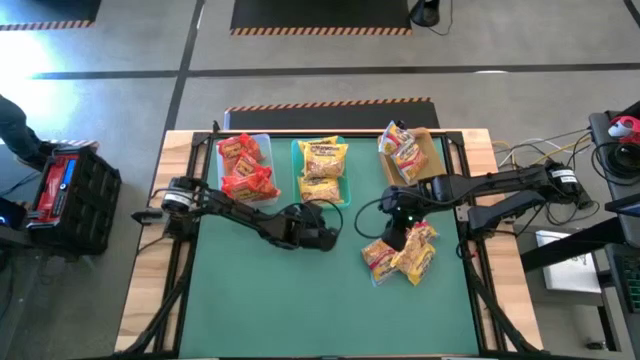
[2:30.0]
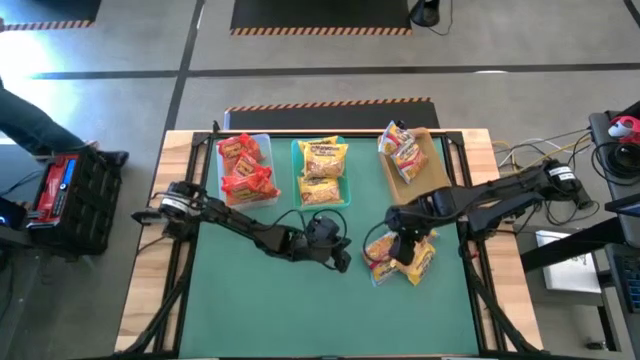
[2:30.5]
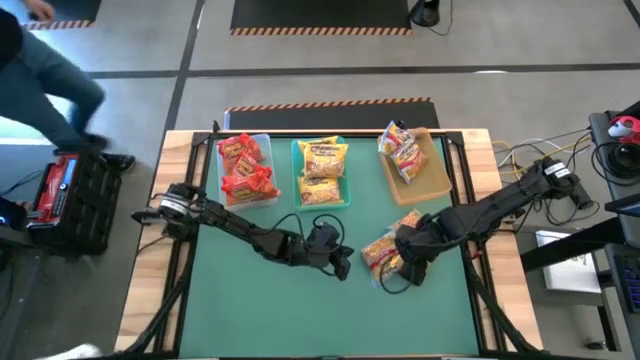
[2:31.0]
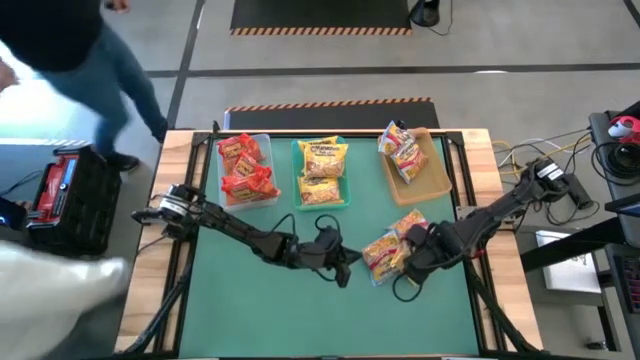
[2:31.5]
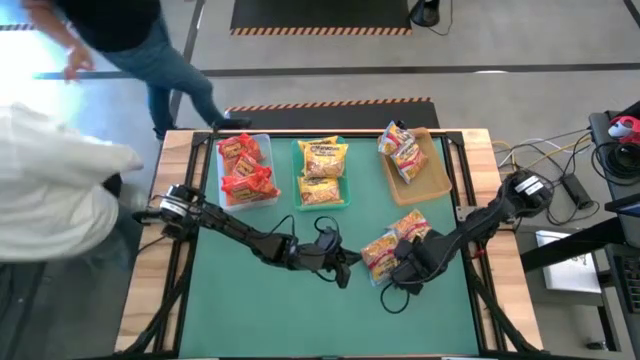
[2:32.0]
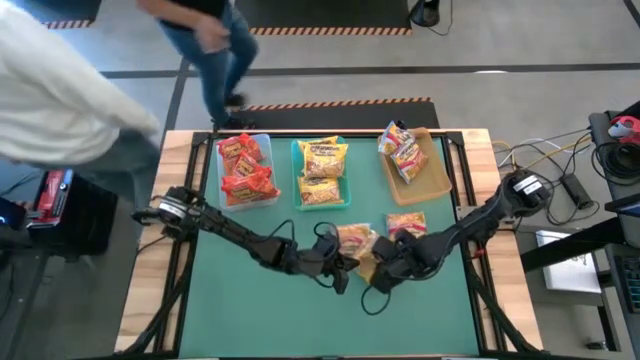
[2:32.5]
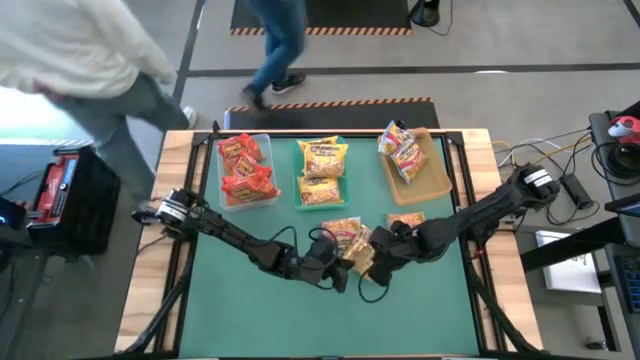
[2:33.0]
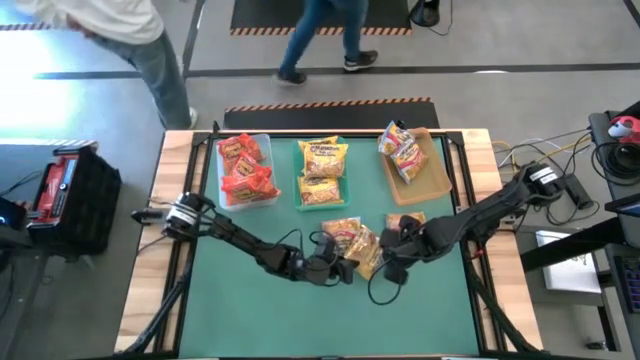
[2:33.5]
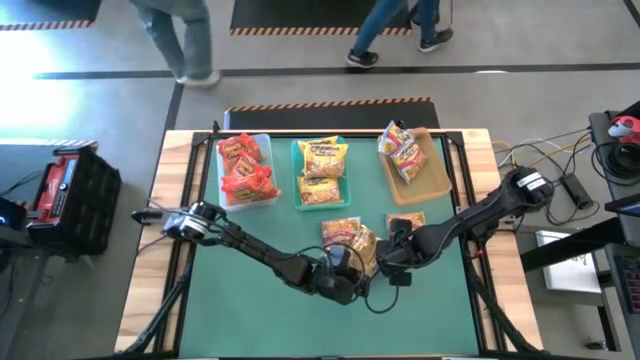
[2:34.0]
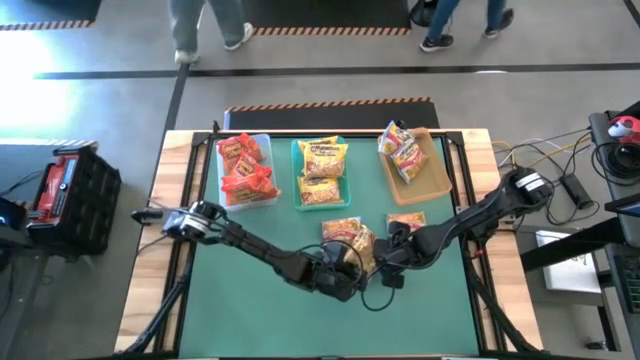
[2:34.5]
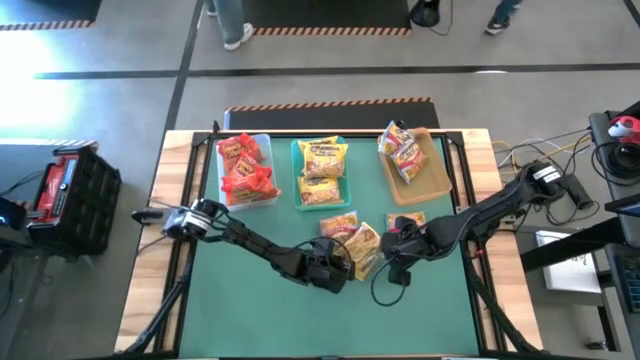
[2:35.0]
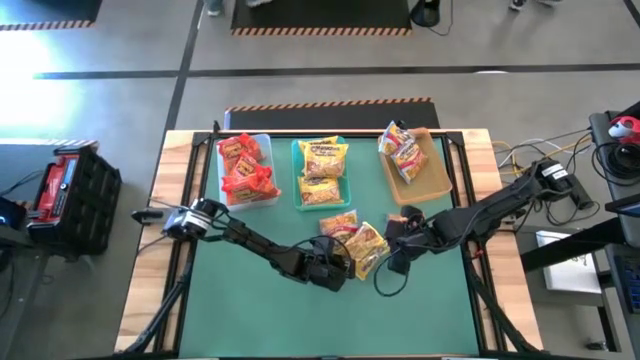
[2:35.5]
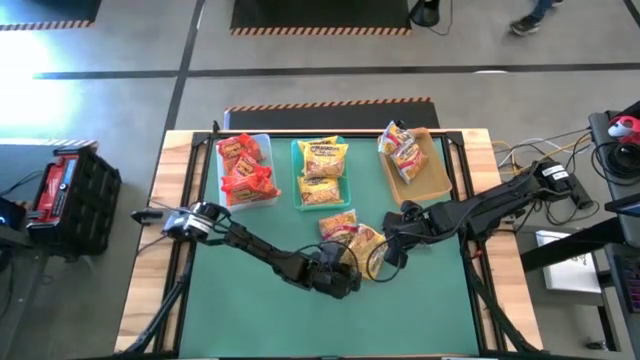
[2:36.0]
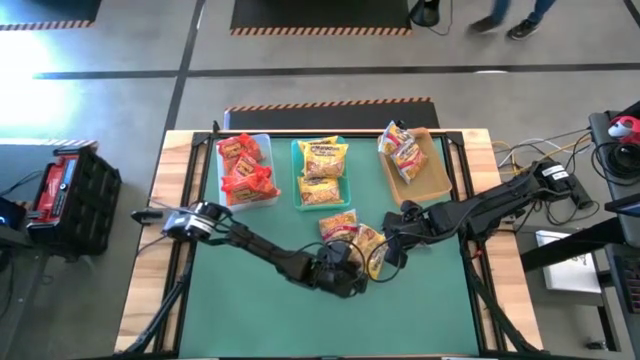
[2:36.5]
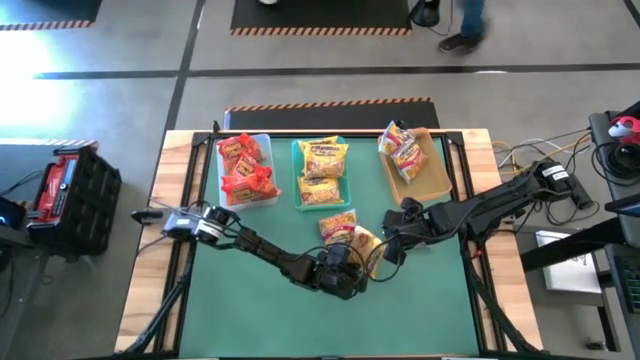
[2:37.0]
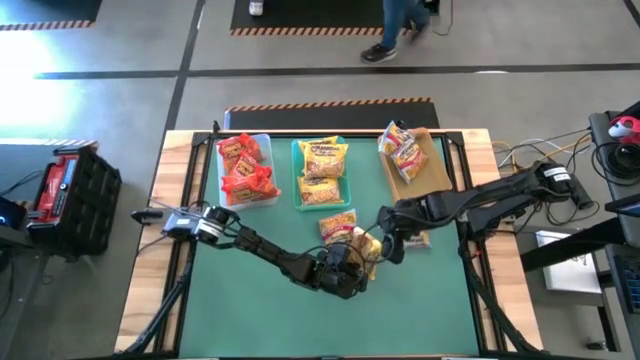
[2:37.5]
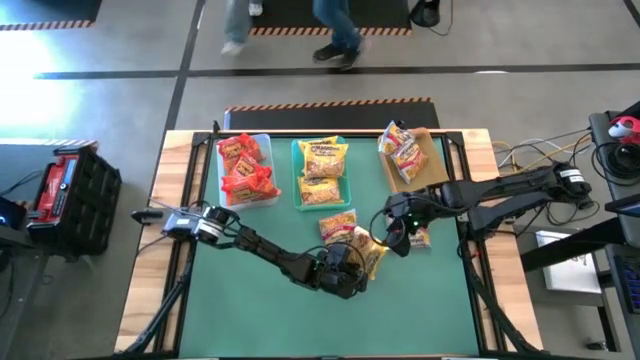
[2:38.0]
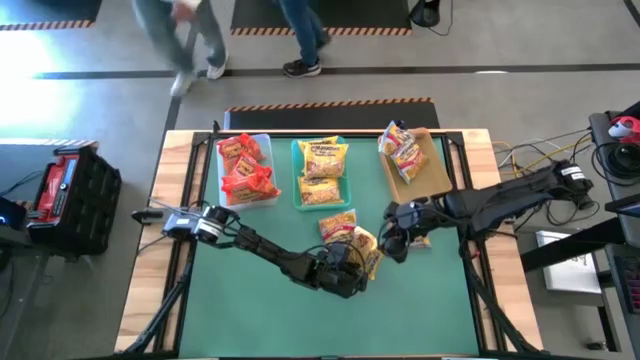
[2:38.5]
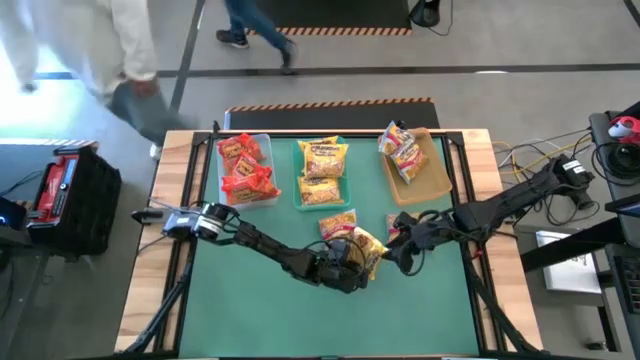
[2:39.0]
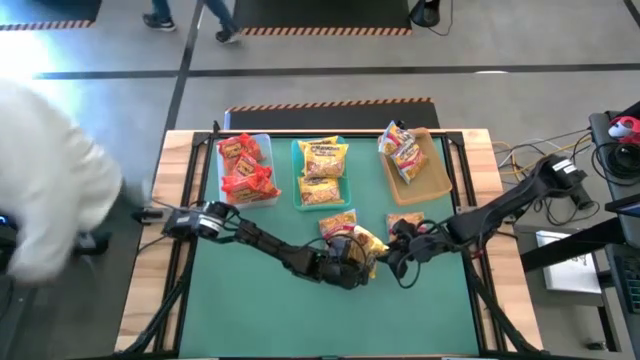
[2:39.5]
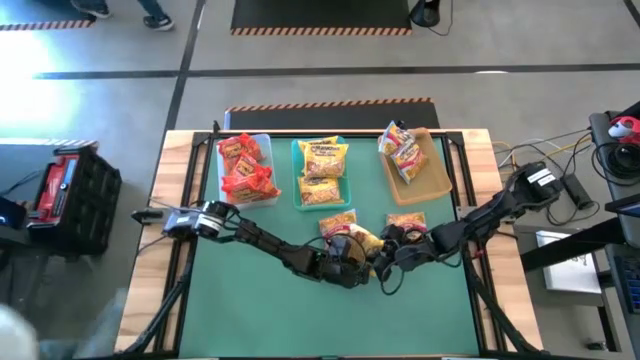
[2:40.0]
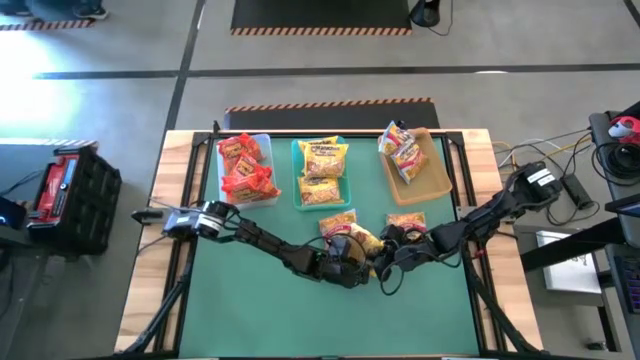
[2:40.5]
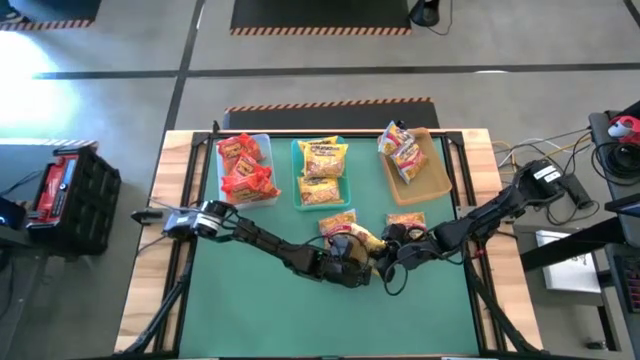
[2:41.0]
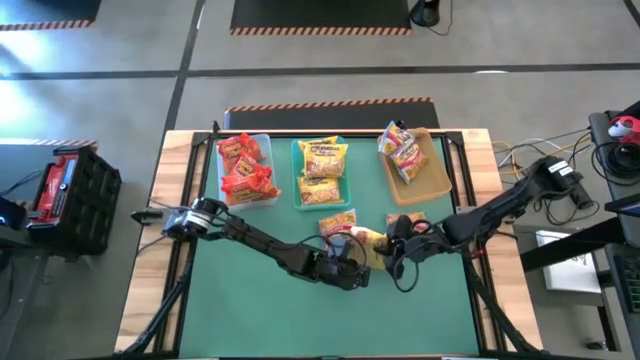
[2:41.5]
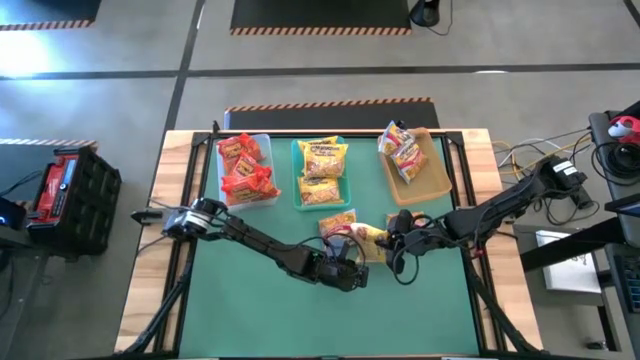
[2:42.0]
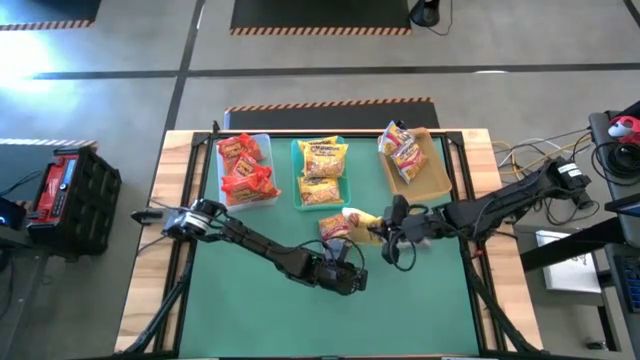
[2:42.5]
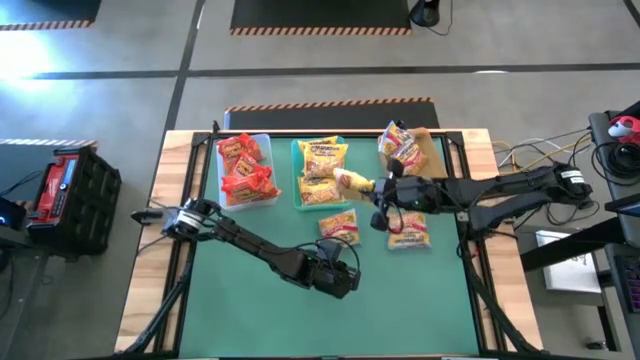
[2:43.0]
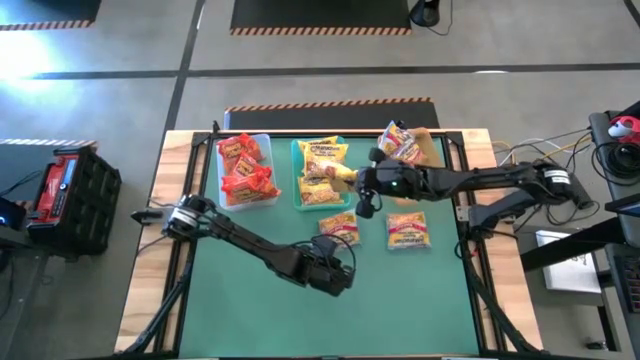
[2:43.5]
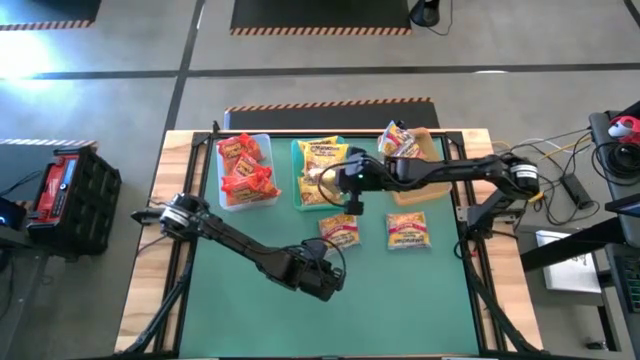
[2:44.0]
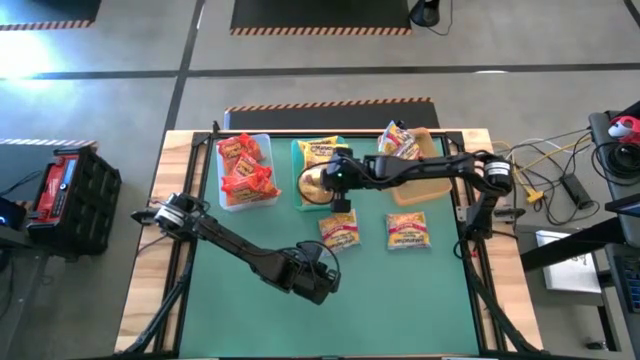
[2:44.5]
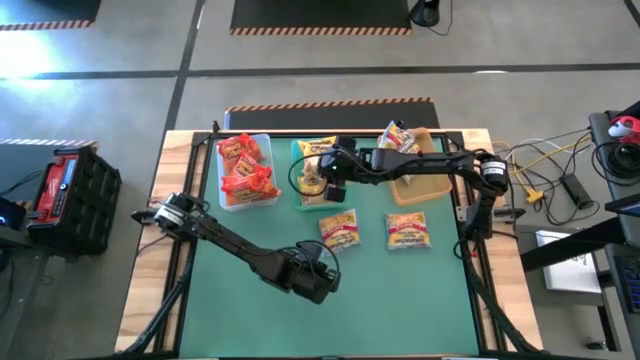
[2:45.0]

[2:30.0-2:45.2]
Task: Sort Maruchan noodles
Put the yellow noodle pack into the blue bin

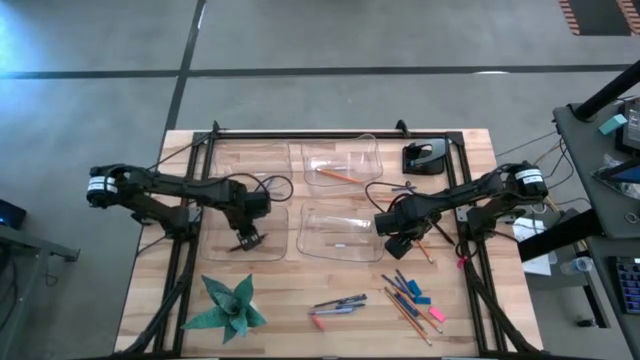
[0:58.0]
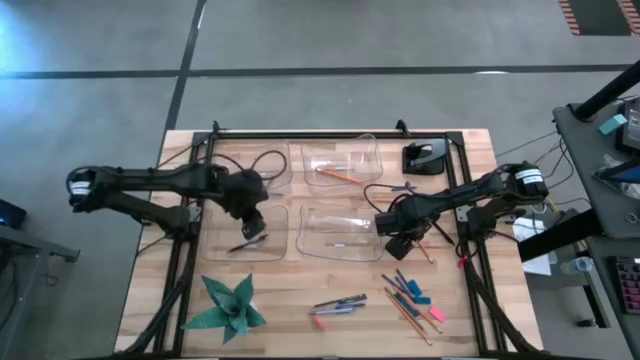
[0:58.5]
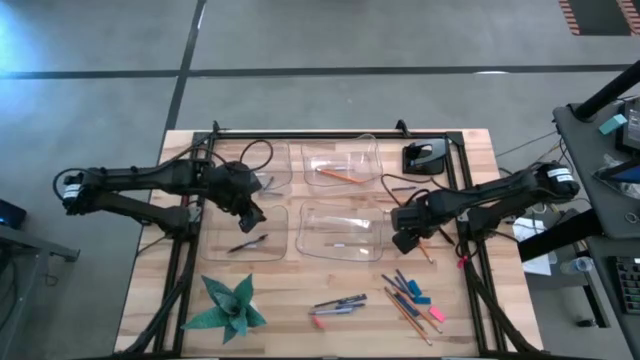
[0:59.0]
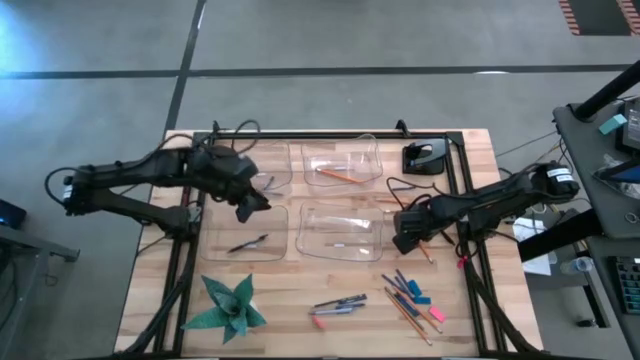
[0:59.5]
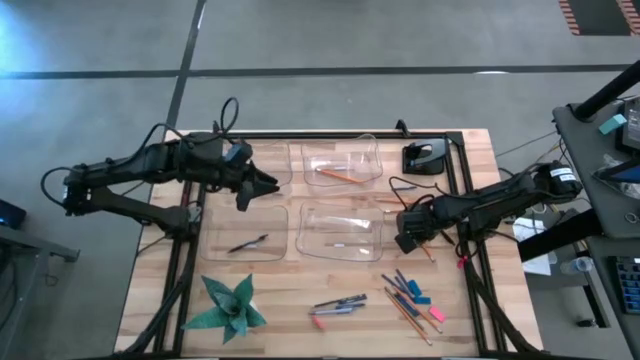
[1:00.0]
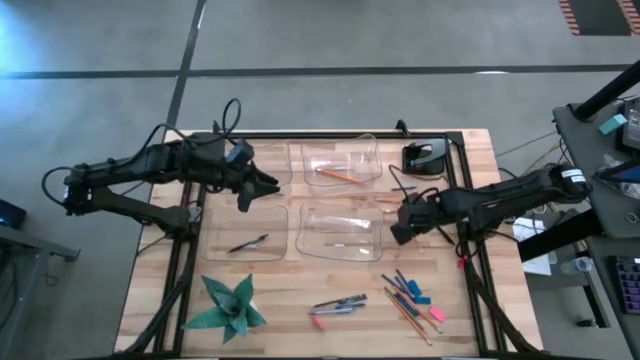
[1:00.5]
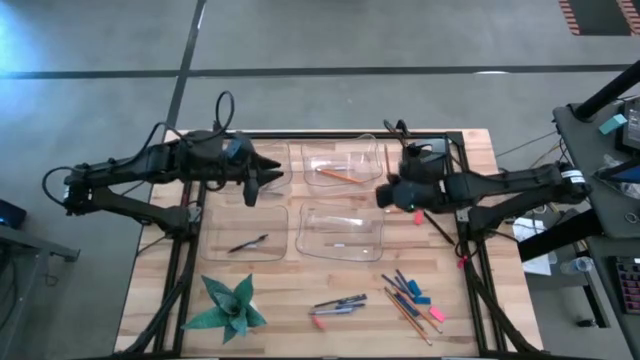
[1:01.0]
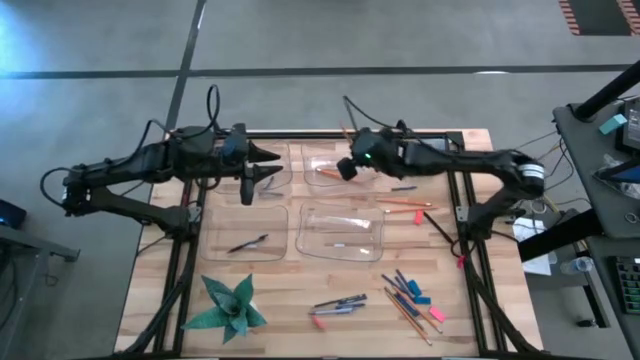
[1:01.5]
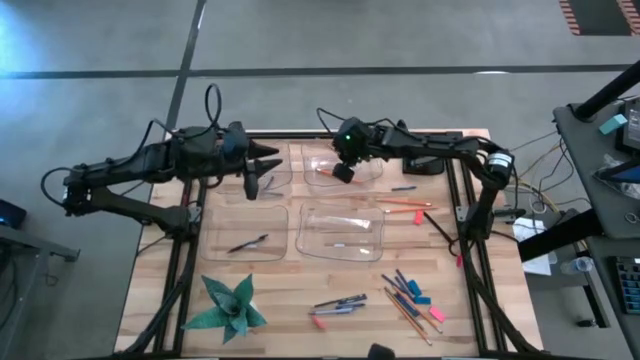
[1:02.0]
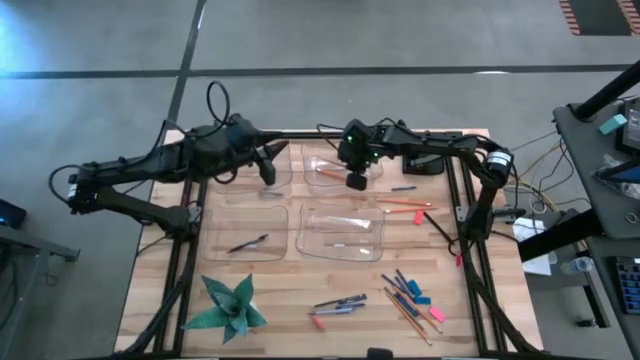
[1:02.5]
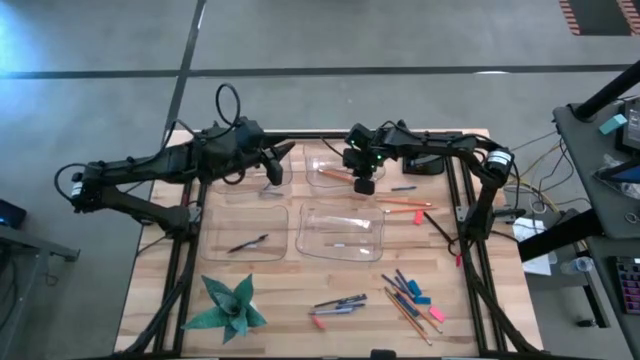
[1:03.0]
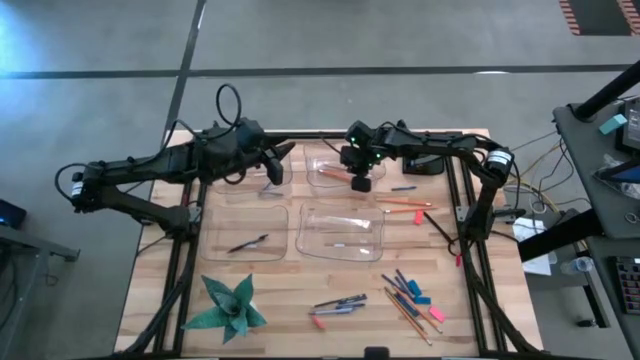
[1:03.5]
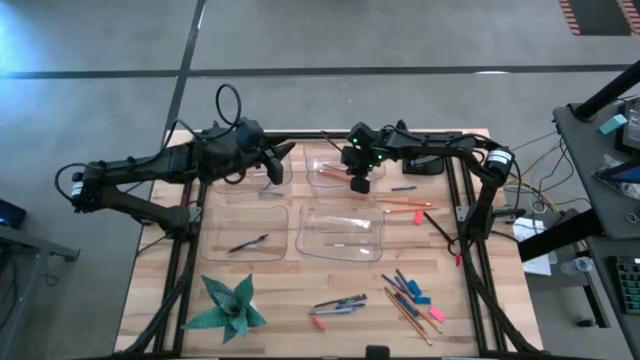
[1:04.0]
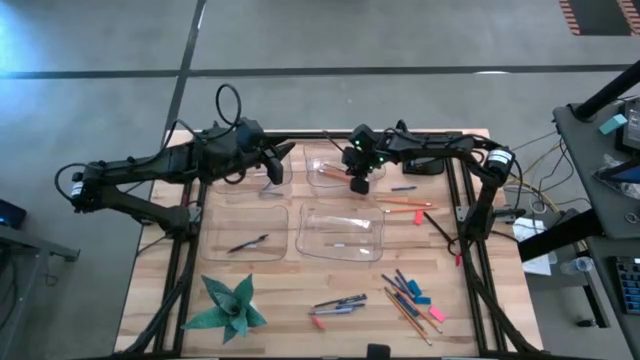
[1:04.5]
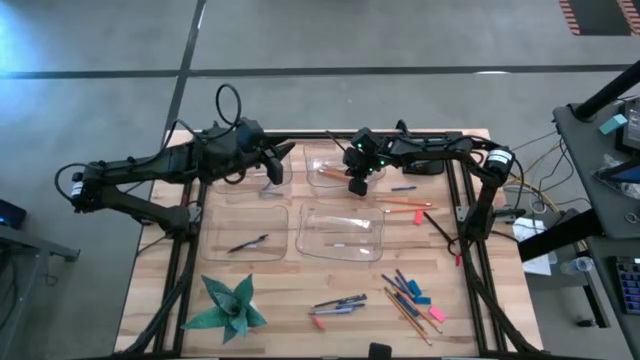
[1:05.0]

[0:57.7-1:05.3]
Task: Sort crayons/erasers/pens/pencils in bins
Put the orange pencil into the top right transparent bin
